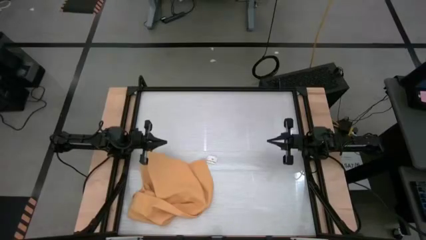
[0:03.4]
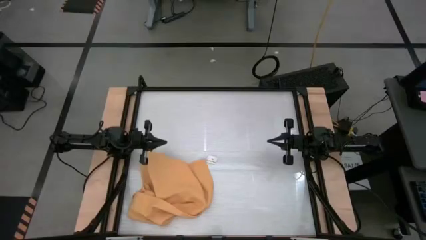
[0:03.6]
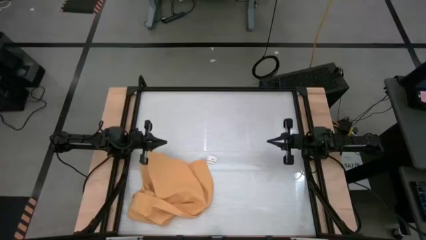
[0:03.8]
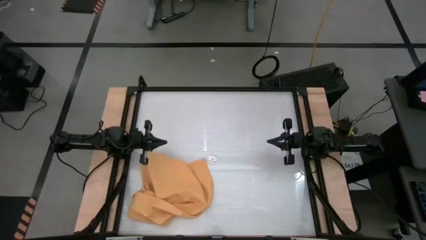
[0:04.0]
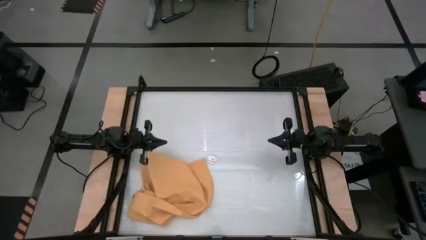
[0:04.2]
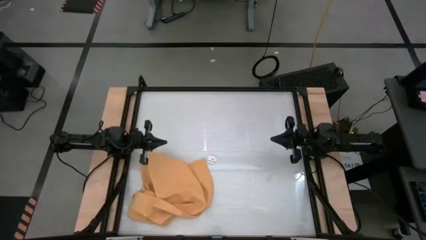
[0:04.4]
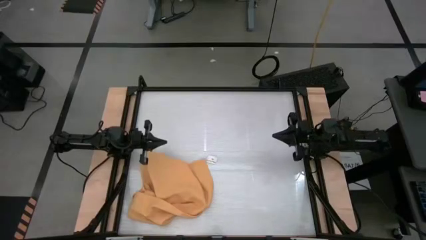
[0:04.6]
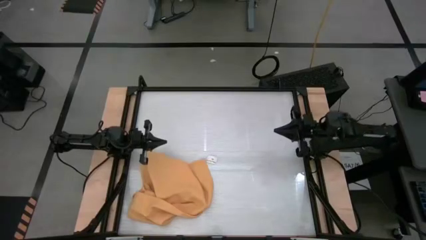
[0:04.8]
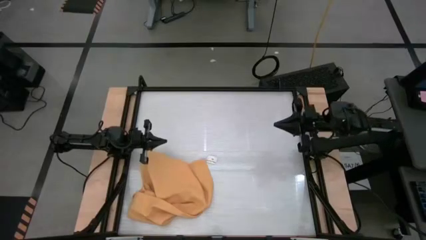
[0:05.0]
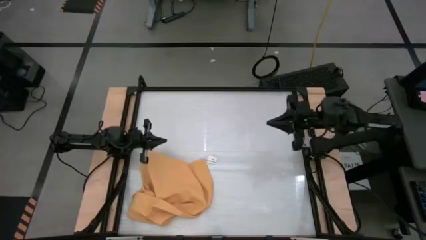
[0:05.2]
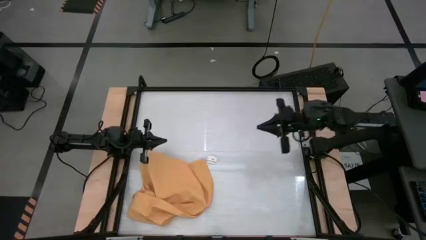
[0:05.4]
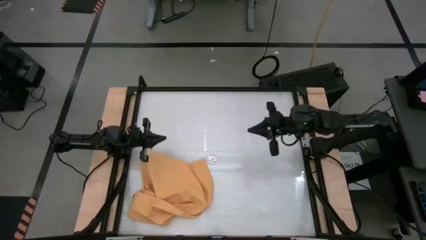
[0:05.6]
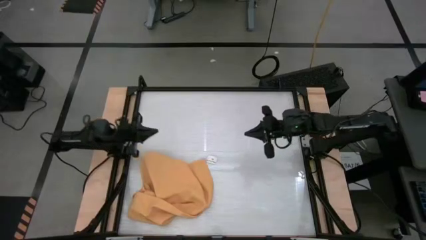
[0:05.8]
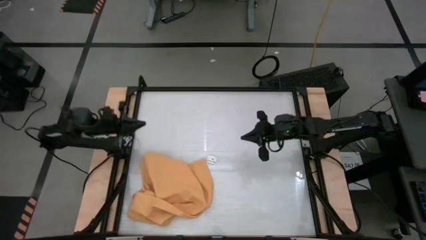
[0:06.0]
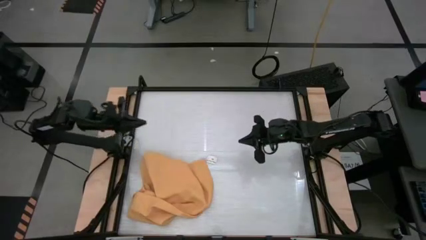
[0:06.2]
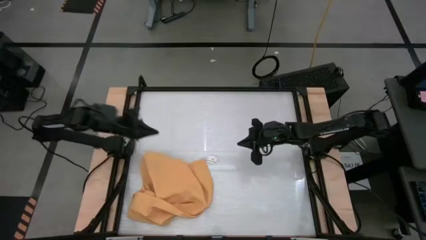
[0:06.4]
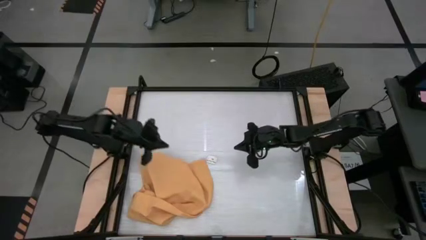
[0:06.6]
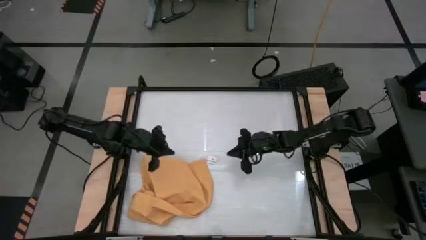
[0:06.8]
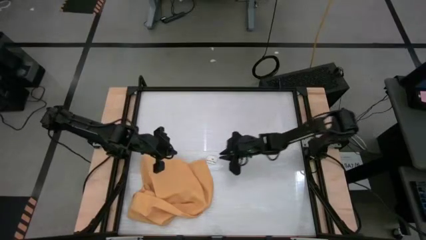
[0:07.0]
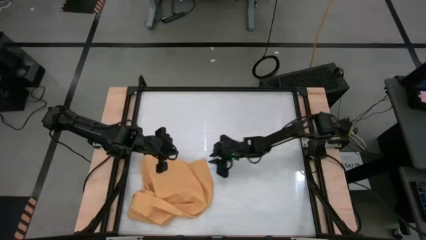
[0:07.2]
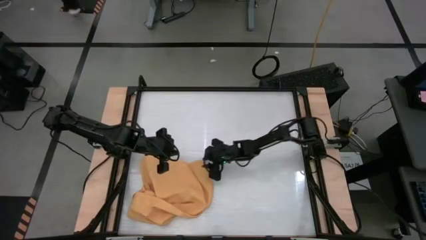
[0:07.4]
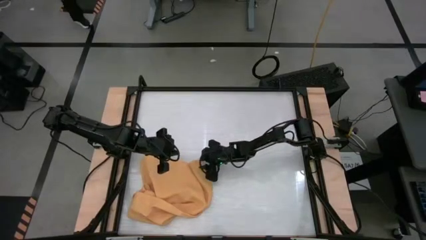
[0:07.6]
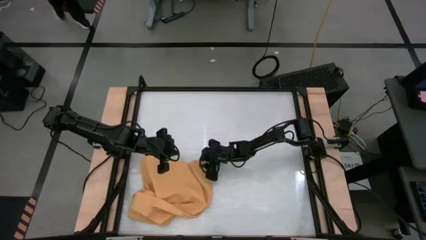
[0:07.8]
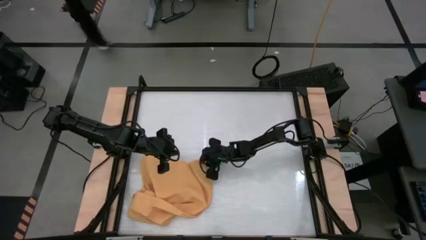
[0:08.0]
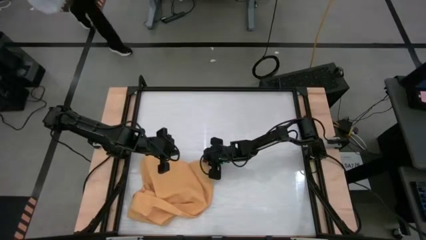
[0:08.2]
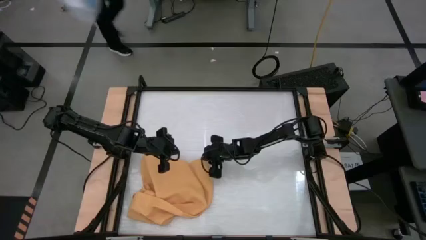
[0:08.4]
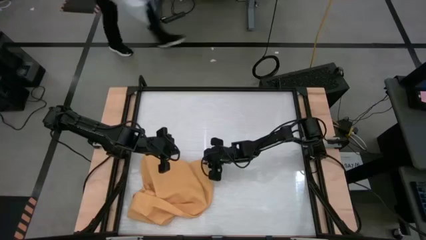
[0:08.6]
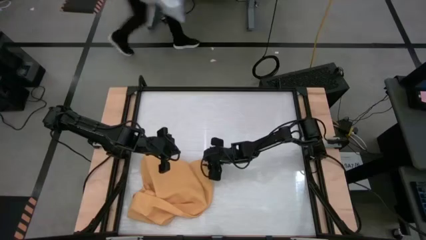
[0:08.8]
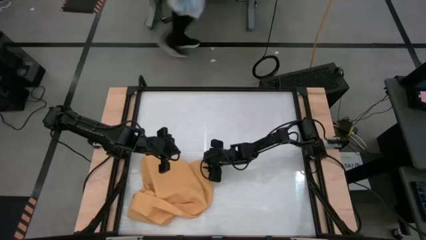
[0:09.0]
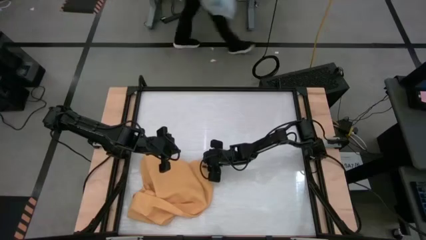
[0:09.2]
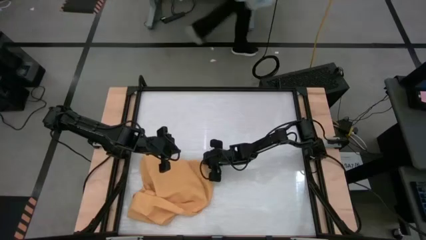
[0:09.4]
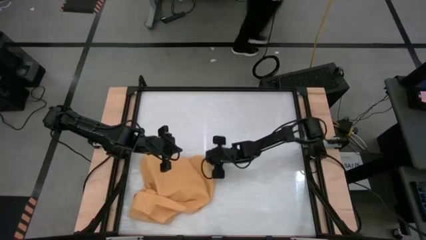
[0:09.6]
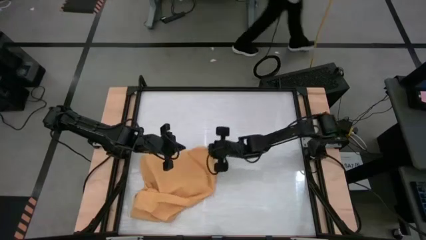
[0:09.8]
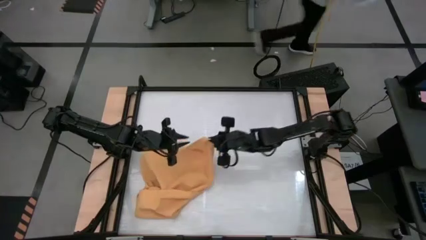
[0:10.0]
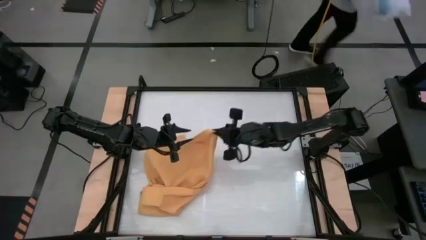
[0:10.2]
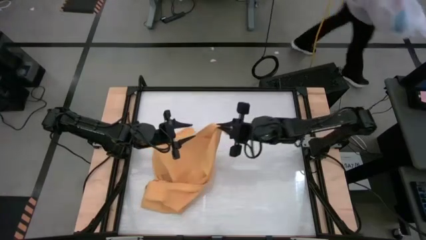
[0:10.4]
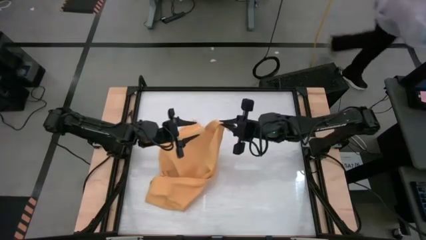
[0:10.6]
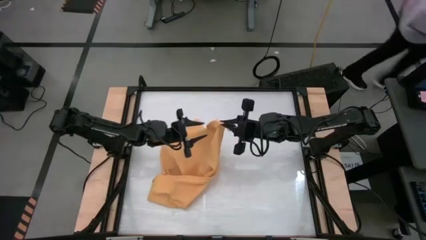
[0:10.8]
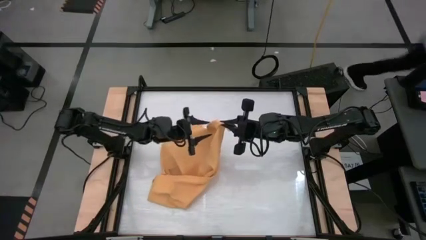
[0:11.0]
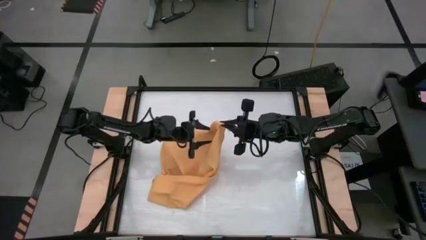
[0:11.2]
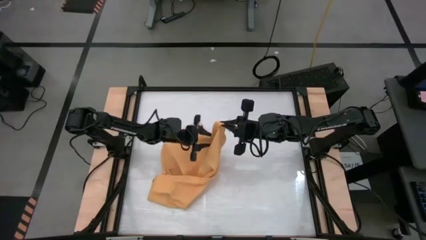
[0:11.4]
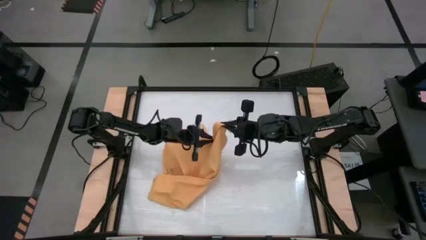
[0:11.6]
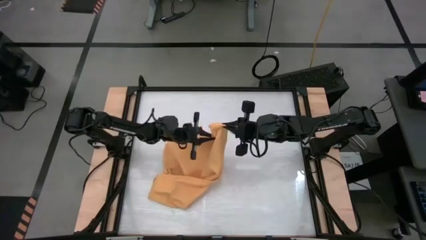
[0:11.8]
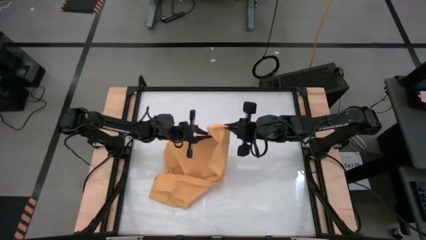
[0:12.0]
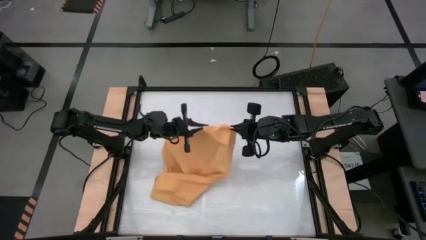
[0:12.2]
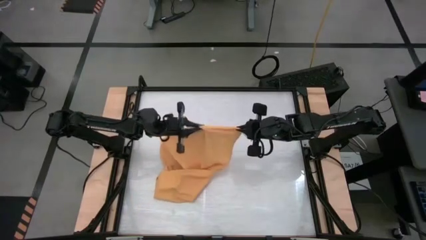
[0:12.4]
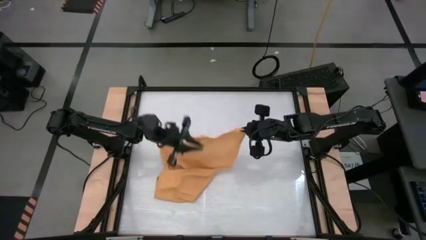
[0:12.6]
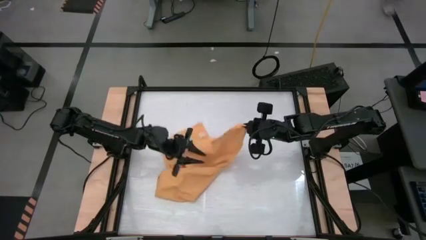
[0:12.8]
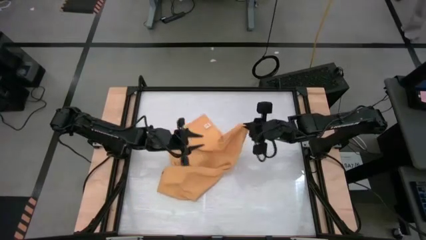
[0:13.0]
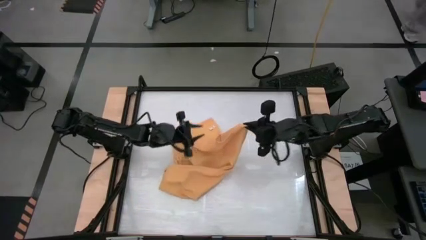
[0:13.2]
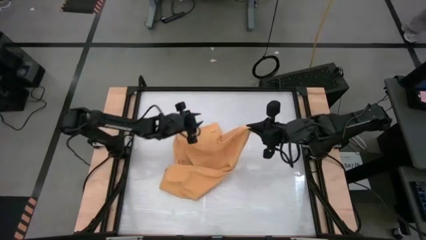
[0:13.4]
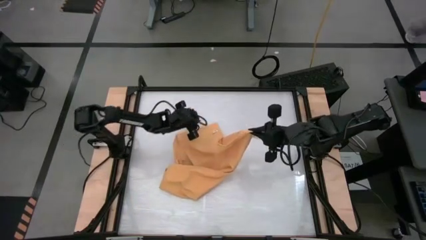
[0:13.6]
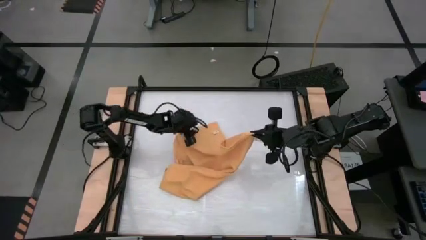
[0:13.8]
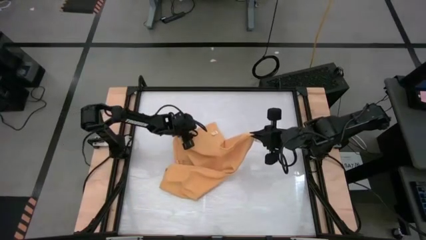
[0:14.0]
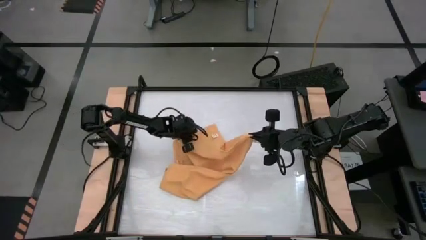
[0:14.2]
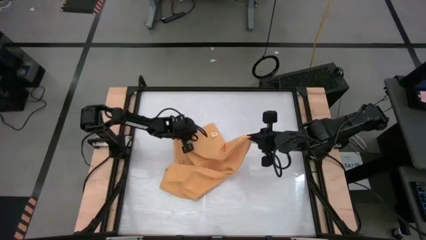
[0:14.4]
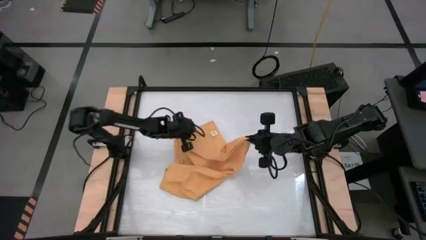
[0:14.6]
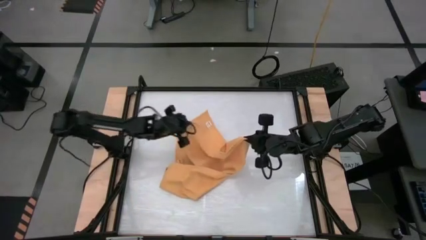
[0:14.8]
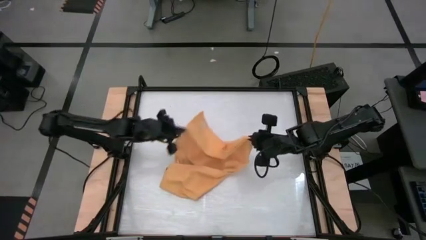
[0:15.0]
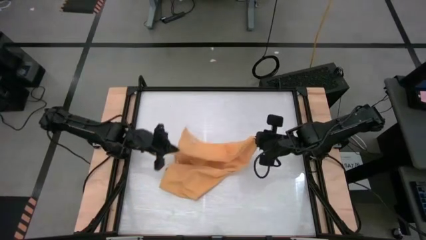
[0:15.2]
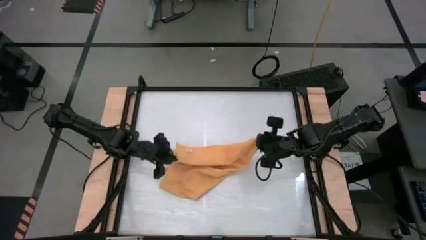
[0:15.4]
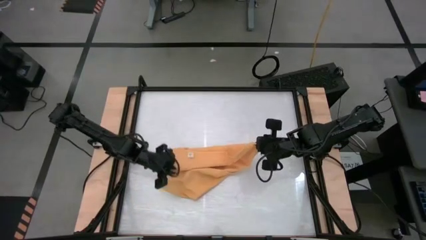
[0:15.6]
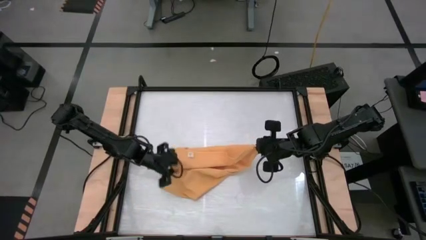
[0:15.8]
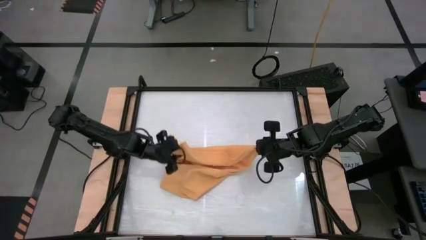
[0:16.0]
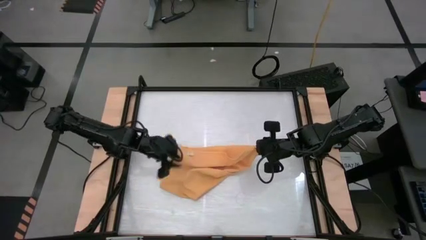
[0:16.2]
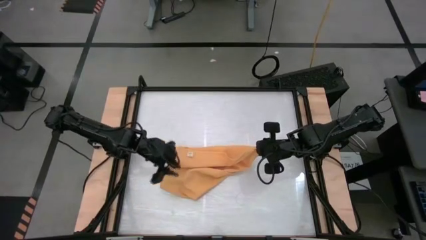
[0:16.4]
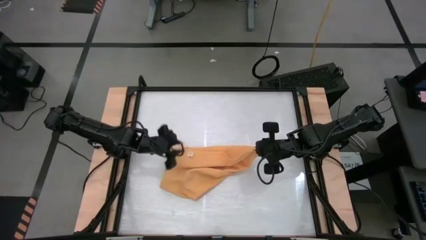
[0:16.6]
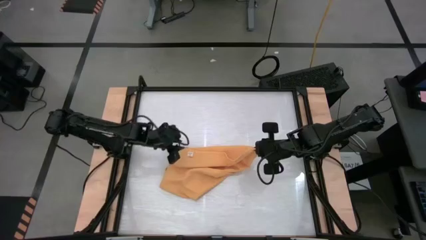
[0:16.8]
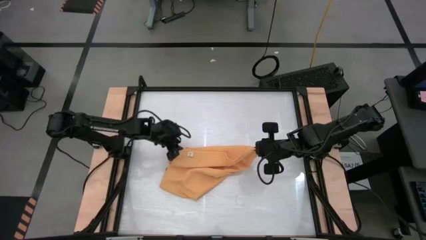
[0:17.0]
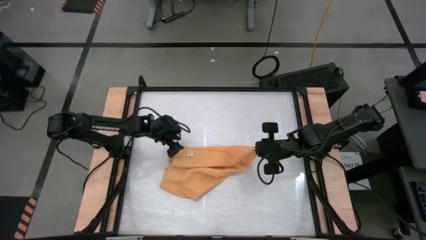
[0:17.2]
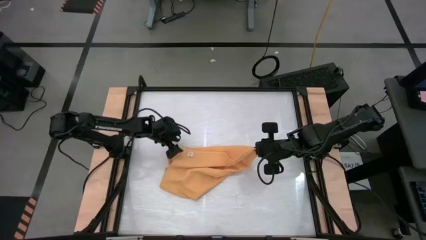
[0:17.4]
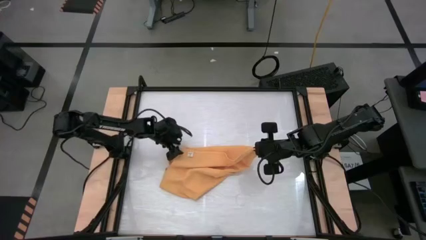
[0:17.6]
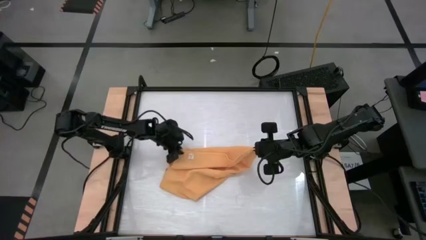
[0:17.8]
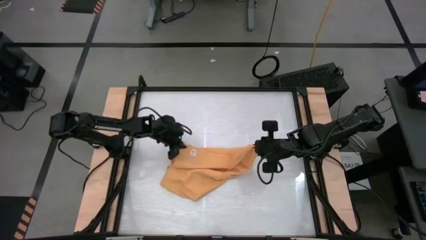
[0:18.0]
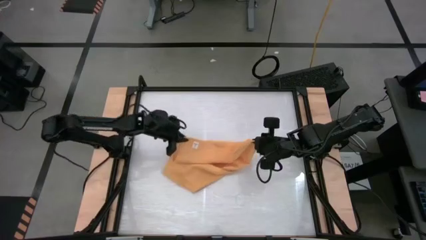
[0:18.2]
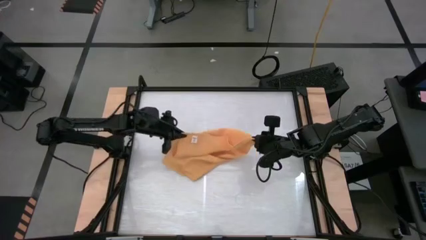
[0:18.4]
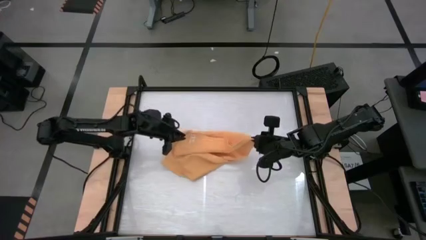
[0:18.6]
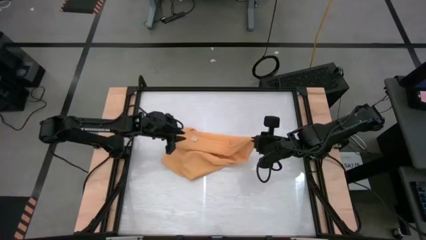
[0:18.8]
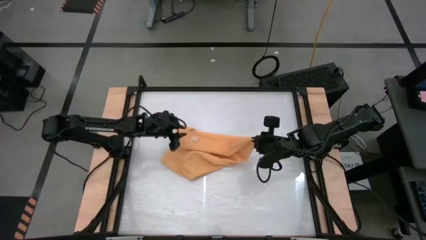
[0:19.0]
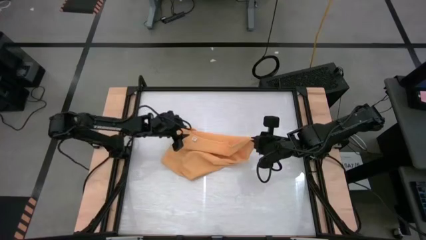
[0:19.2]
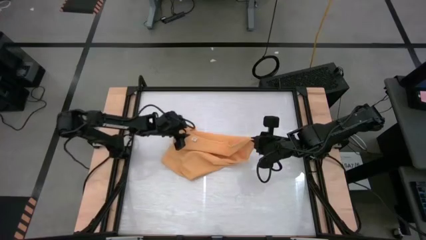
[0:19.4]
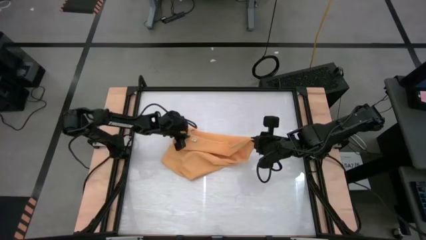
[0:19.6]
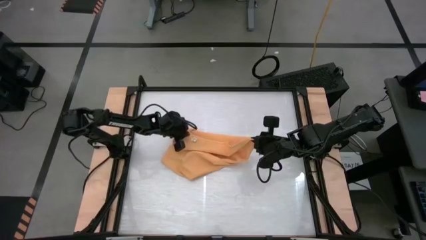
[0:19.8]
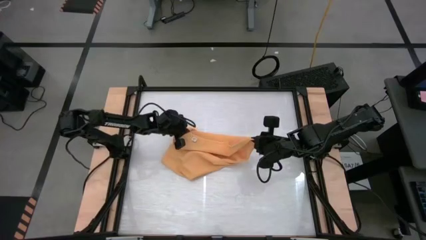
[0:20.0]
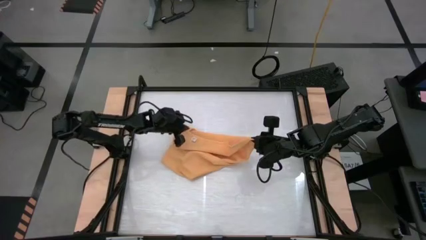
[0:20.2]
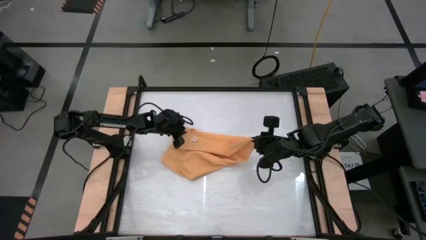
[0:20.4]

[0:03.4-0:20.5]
Task: Roll towel into tight, uniform cylinder
Roll the yellow towel
